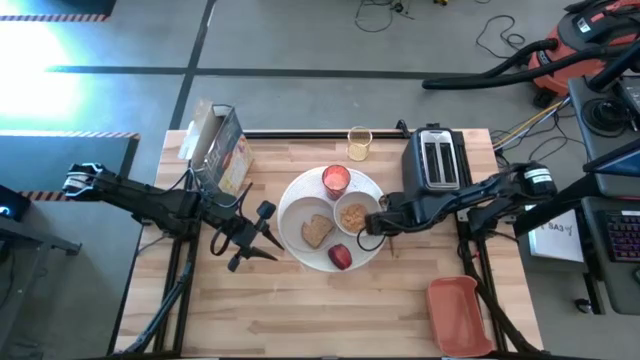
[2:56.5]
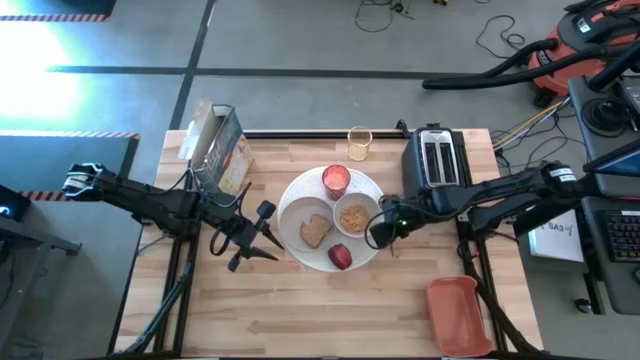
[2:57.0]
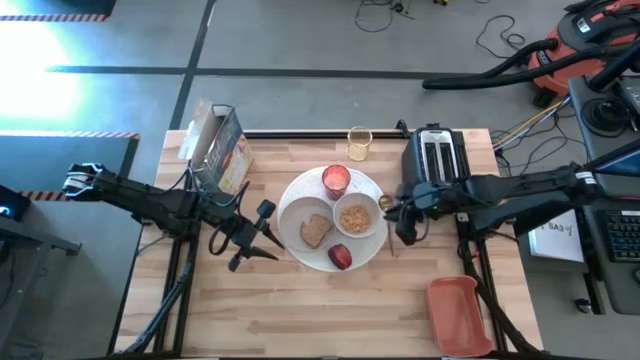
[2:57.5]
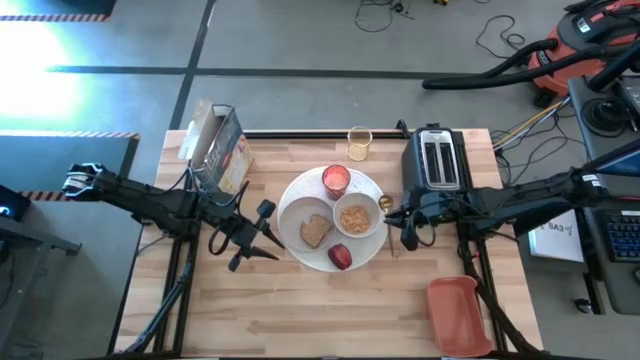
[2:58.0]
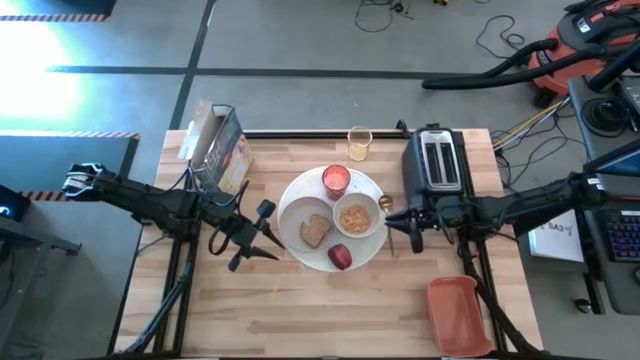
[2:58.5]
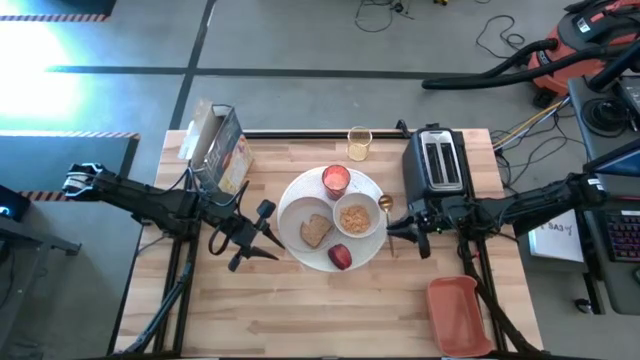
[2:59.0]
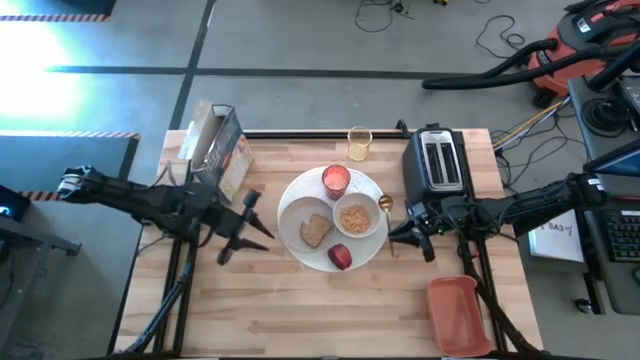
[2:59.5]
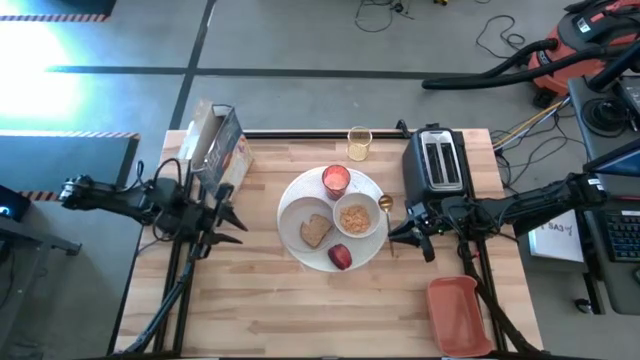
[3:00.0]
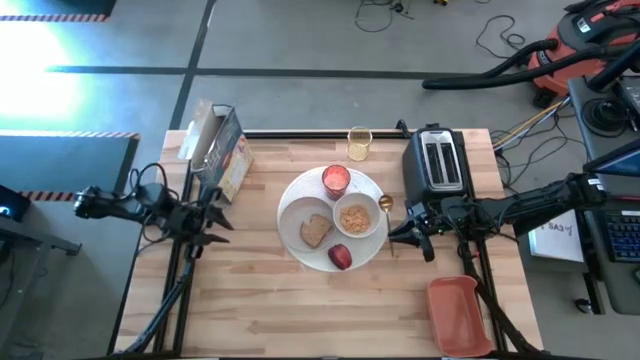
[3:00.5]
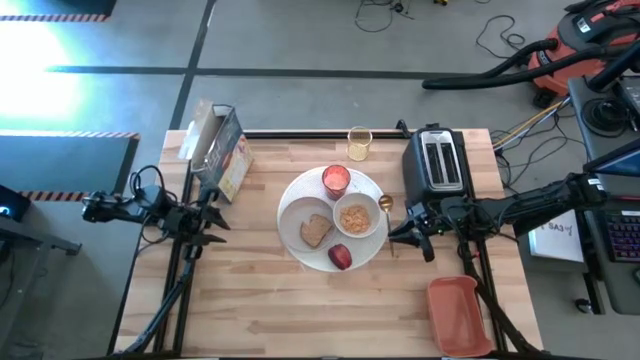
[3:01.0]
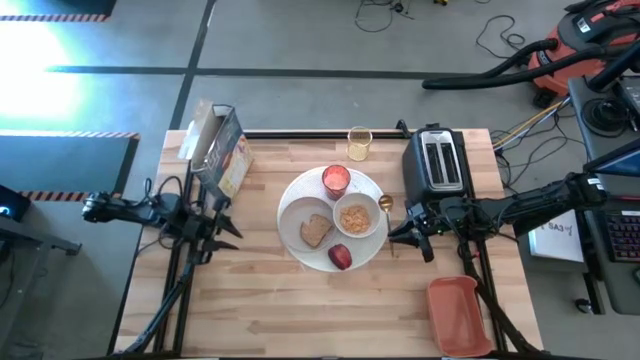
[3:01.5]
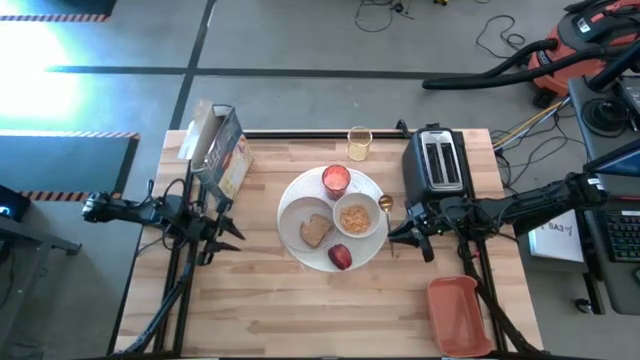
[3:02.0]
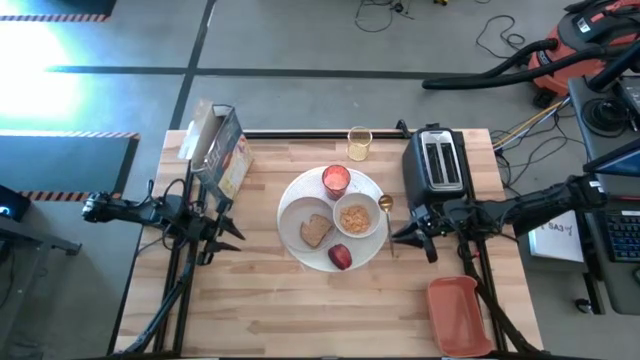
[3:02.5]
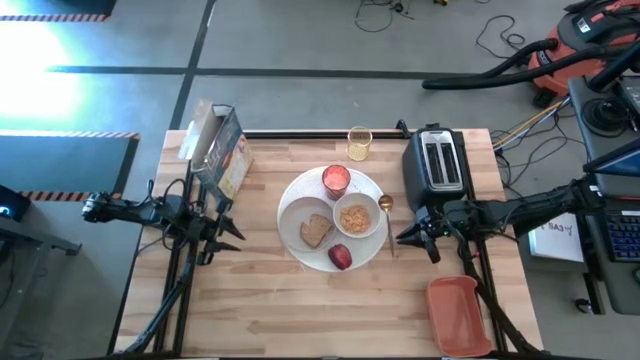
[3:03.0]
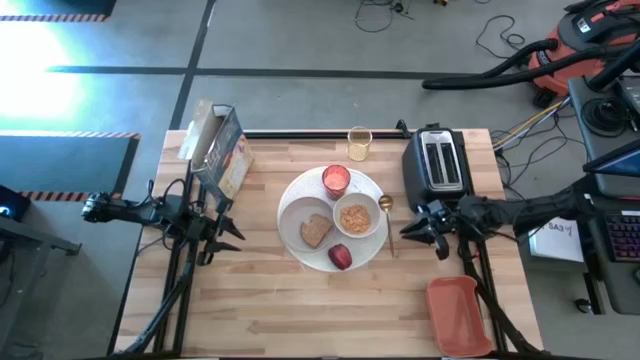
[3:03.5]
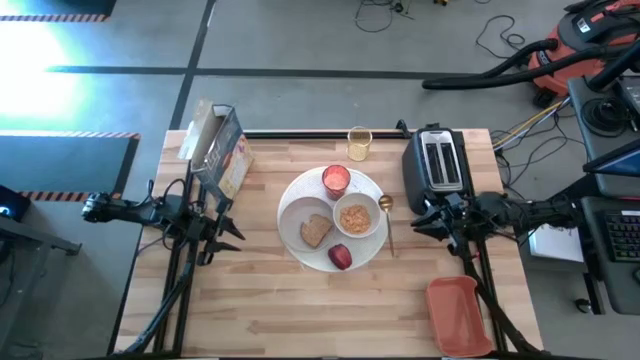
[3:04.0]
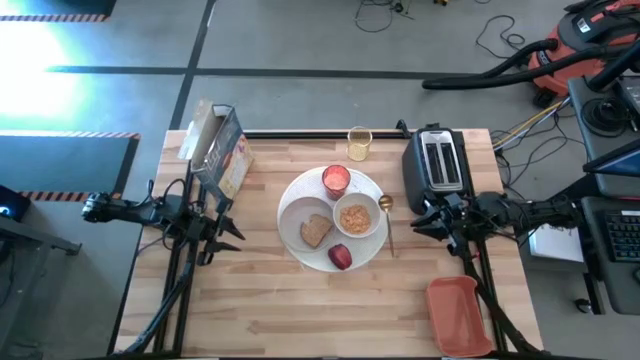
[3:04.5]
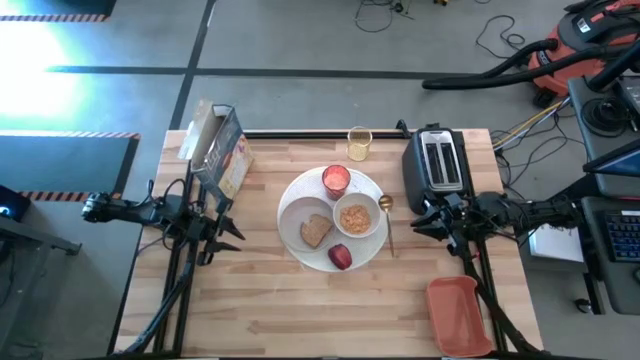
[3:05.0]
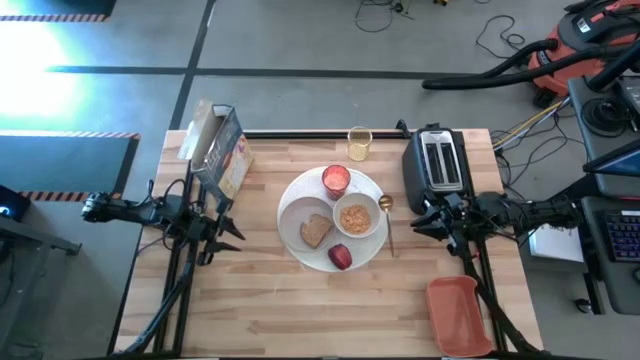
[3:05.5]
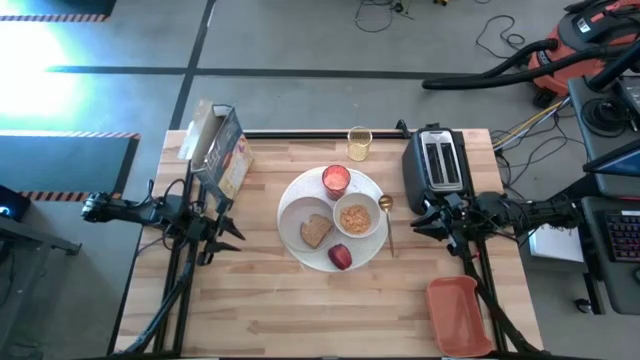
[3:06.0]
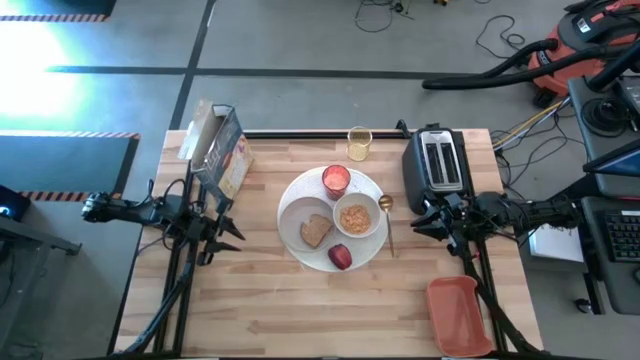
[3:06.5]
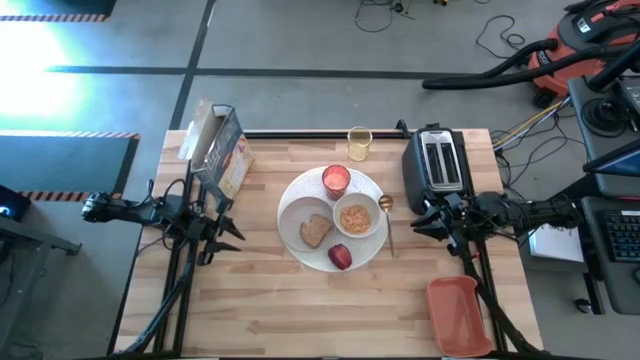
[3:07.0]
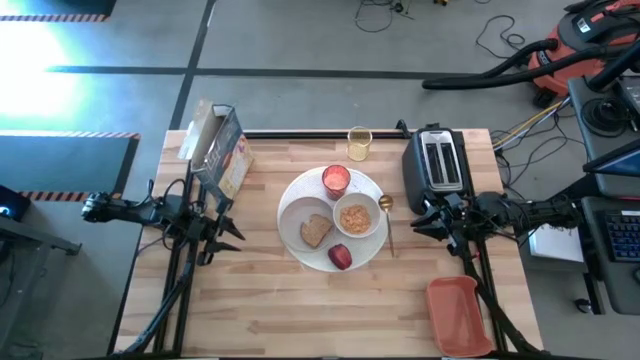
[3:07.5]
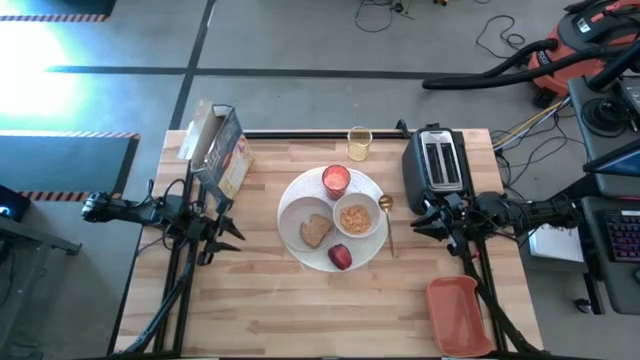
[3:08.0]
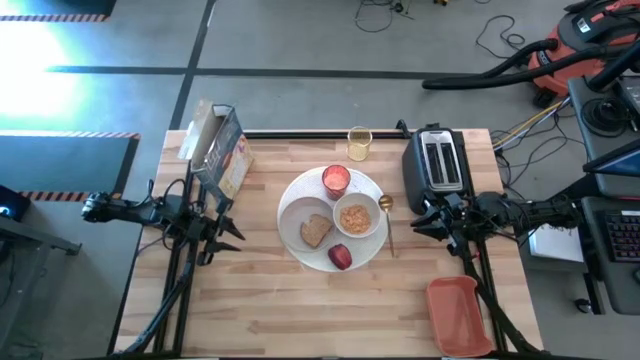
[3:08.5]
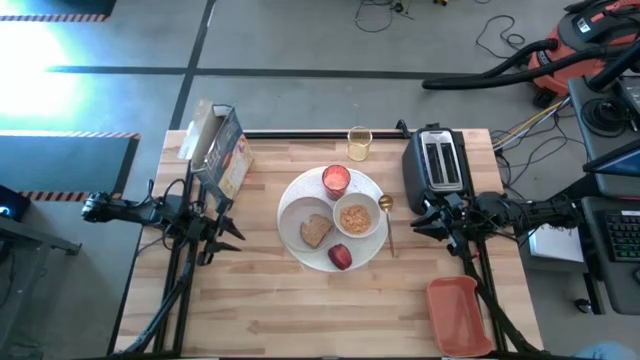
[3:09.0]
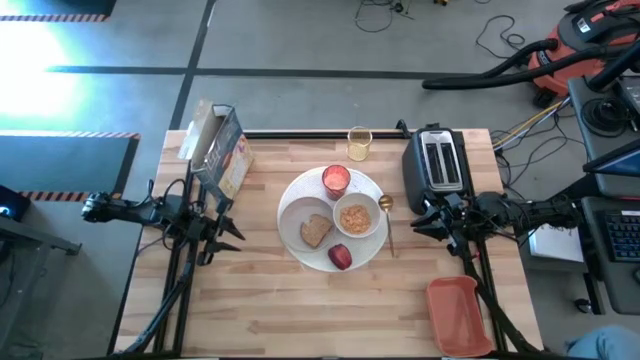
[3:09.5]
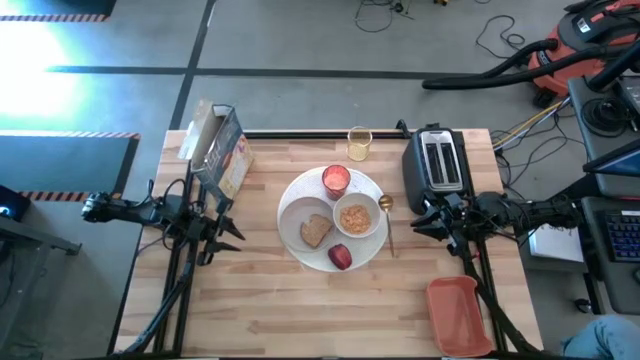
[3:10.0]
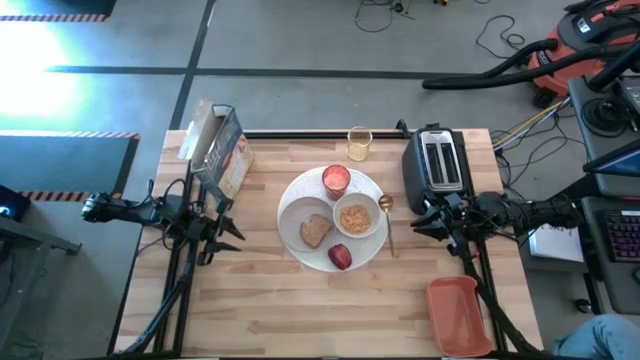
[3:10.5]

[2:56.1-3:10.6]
Task: Arrange a breakfast setting
Return to Home Position

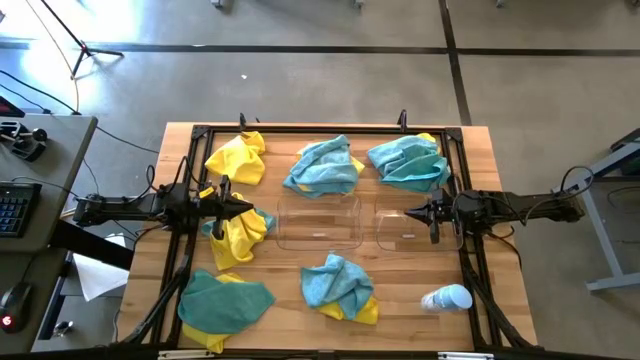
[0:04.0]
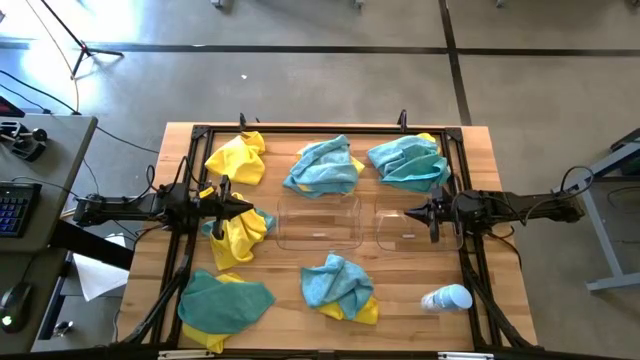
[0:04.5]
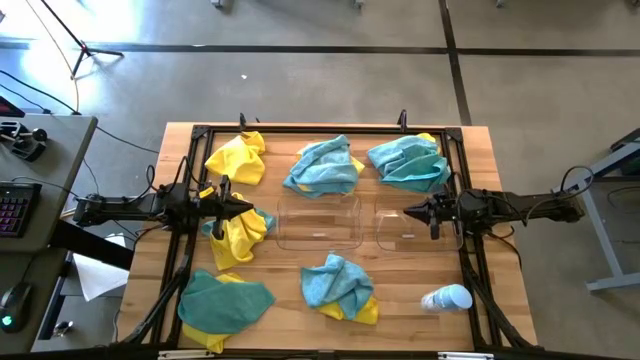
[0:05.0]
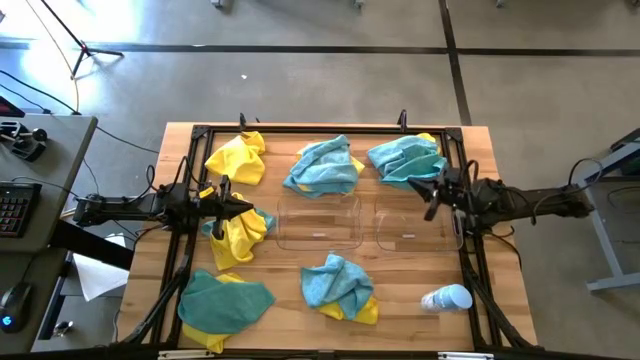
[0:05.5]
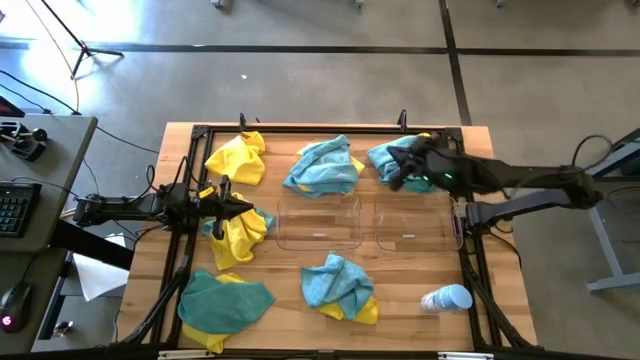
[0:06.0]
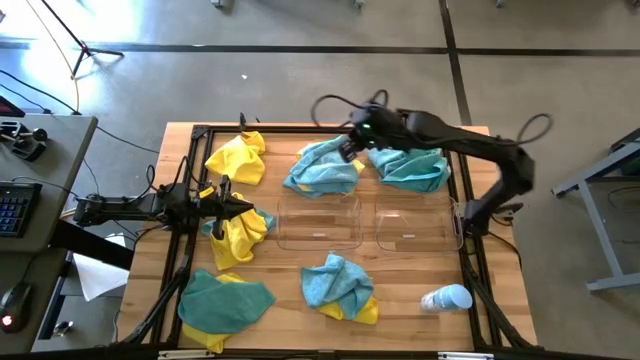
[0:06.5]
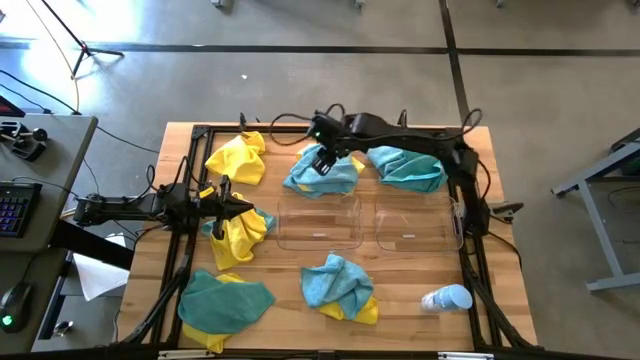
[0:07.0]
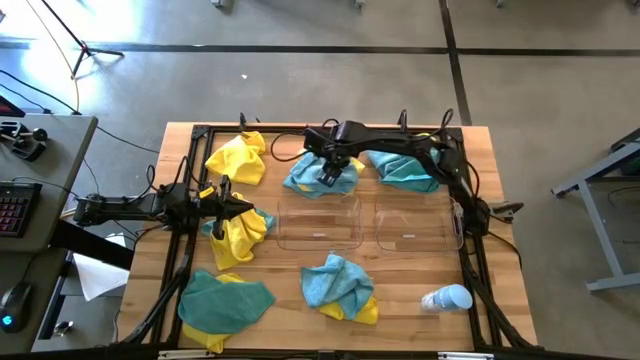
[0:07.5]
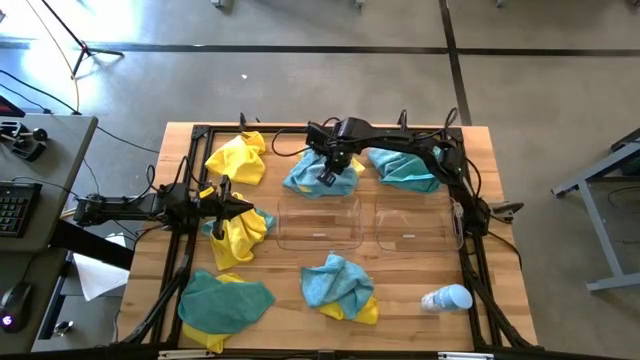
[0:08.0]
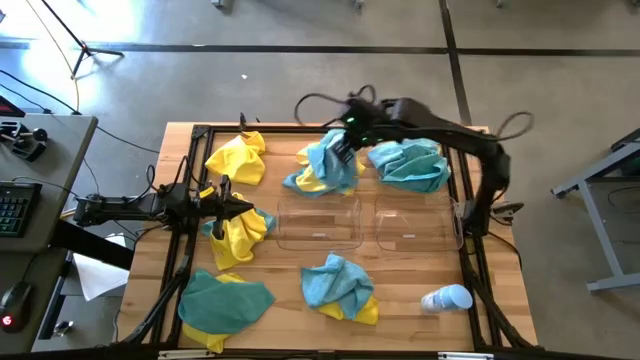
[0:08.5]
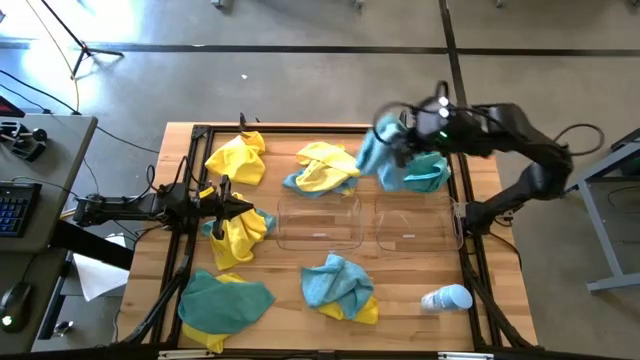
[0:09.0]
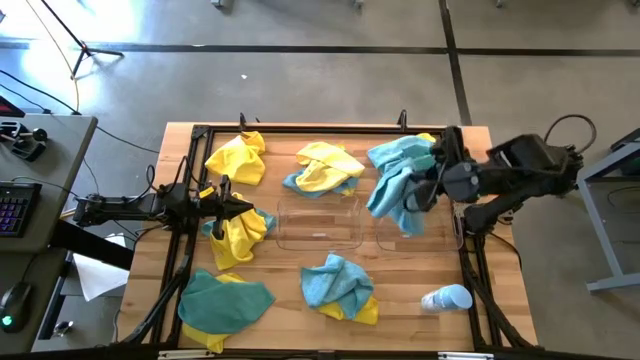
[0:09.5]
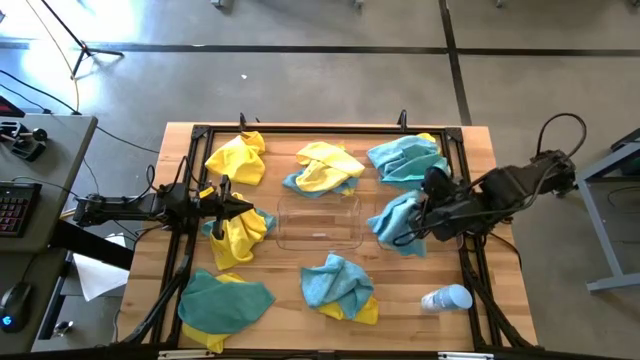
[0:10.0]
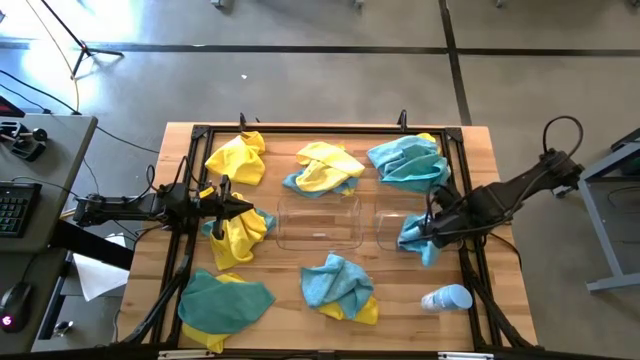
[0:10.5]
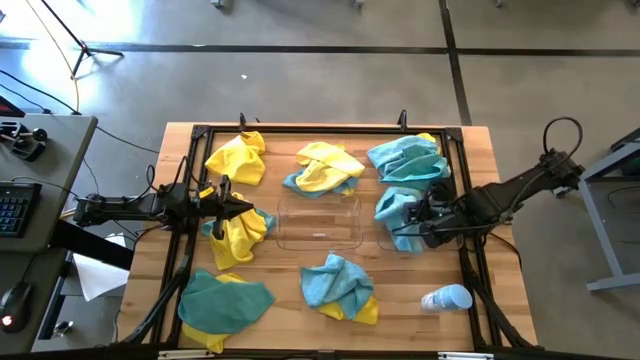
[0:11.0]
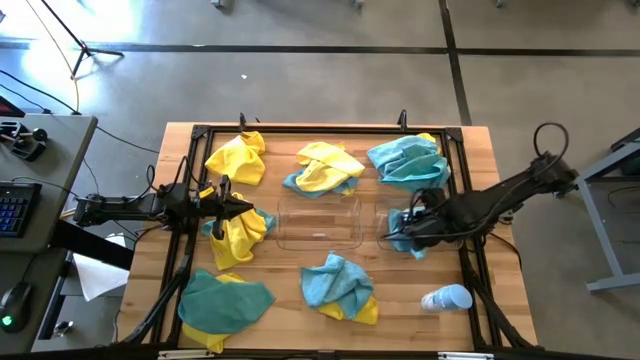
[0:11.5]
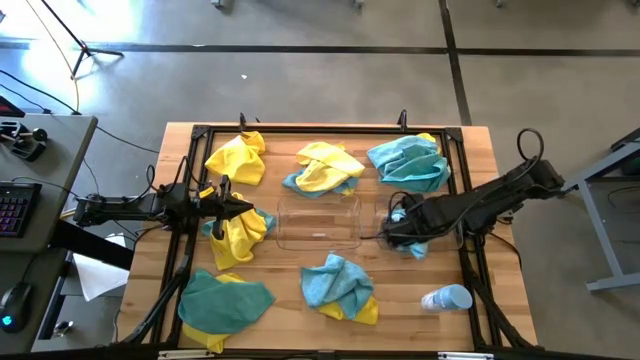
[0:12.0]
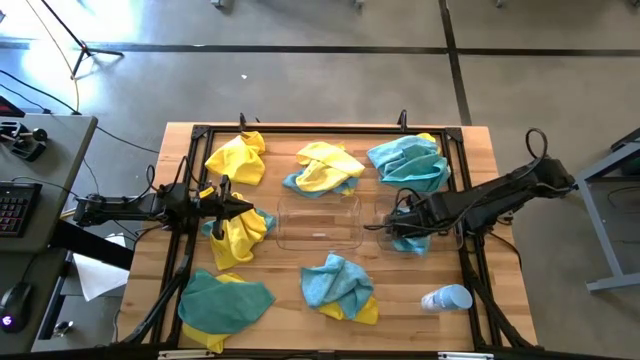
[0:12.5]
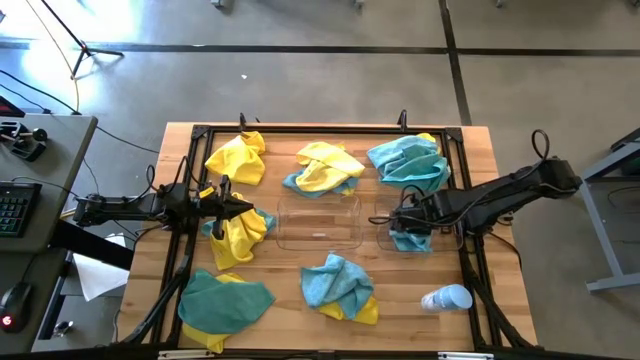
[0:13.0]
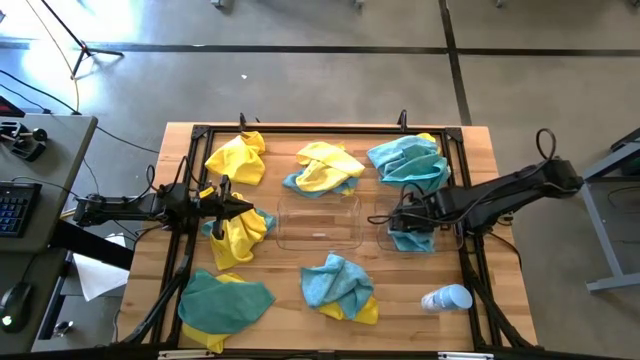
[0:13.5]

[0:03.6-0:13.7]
Task: Sort microfiber towel by color & place in baskets
Put the blue microfiber cloth into the right transparent bin
